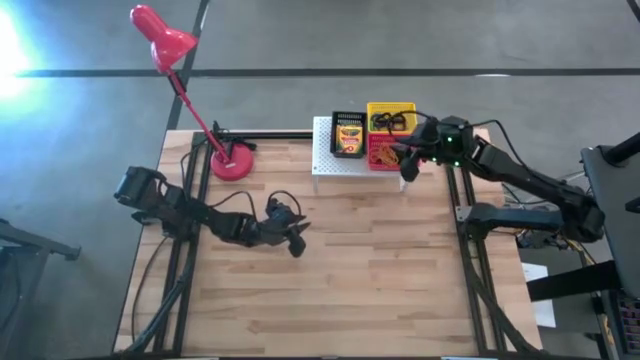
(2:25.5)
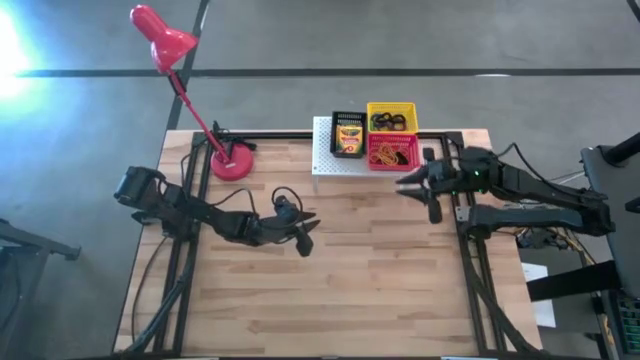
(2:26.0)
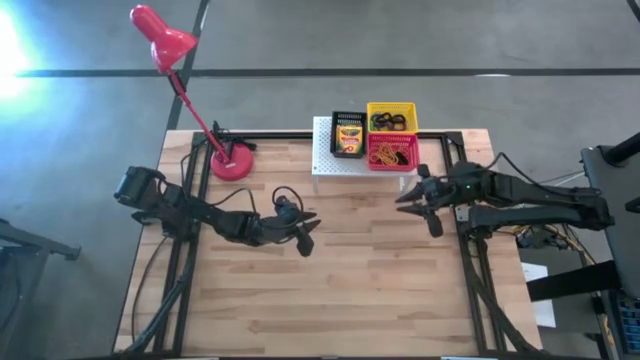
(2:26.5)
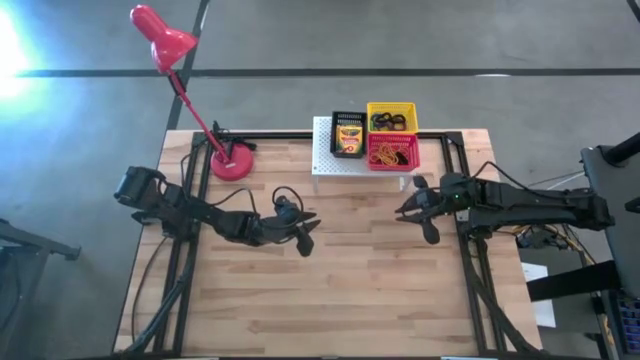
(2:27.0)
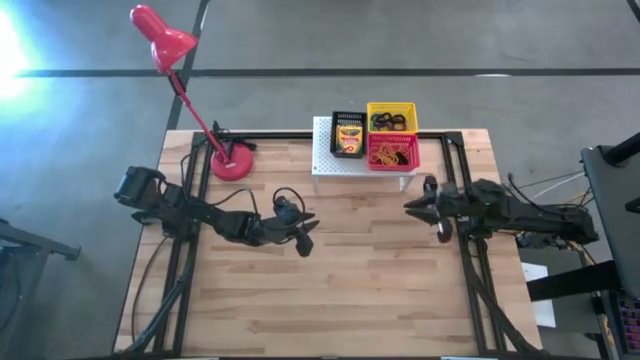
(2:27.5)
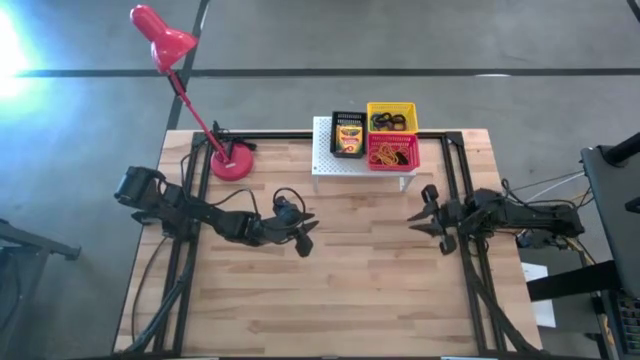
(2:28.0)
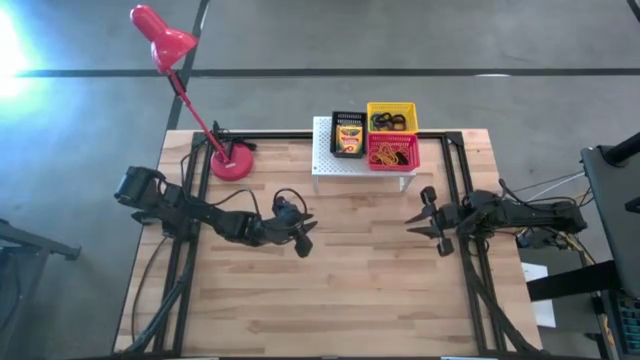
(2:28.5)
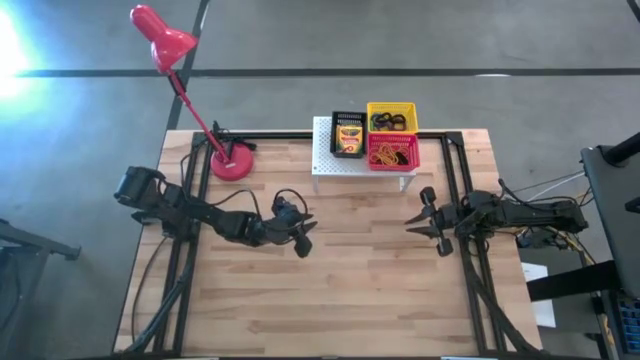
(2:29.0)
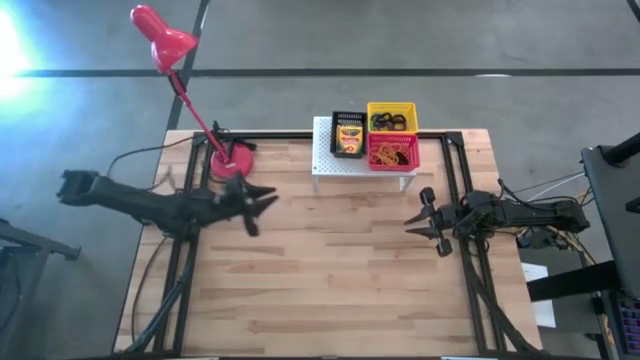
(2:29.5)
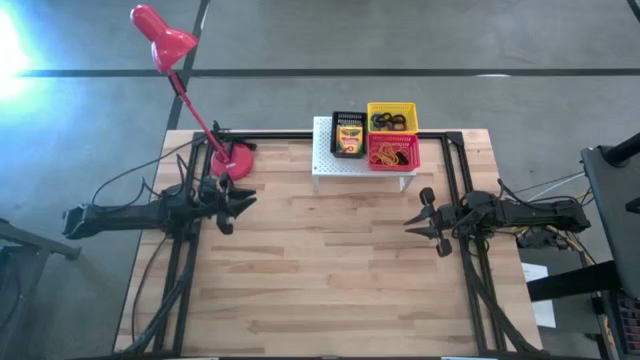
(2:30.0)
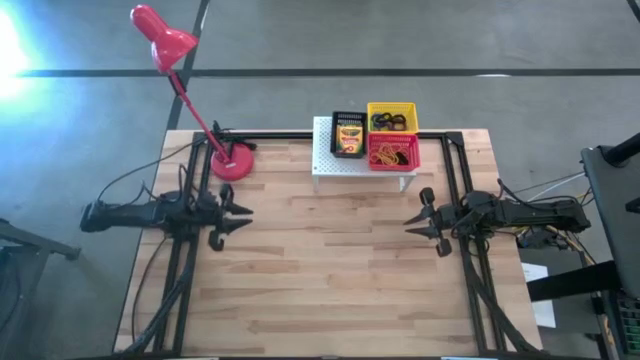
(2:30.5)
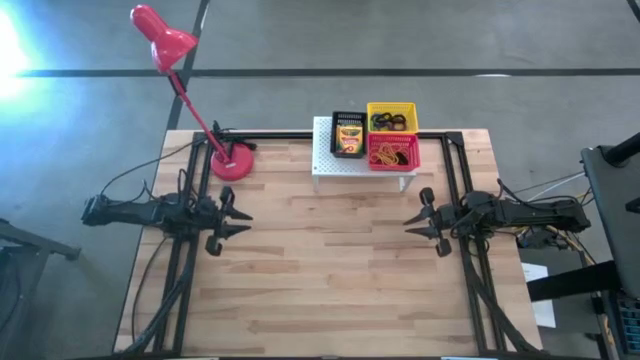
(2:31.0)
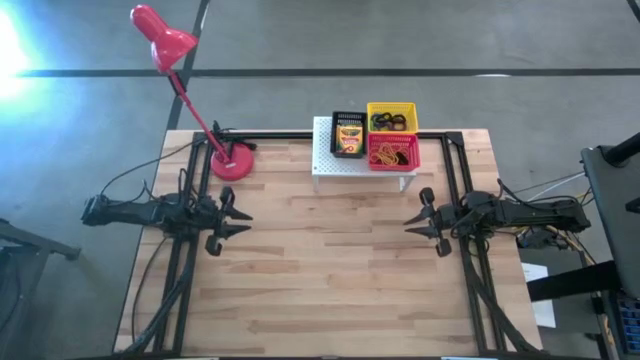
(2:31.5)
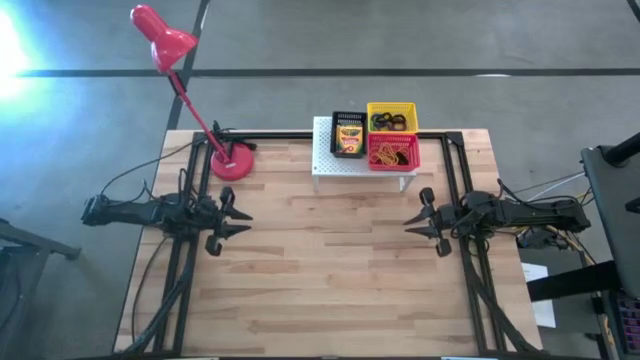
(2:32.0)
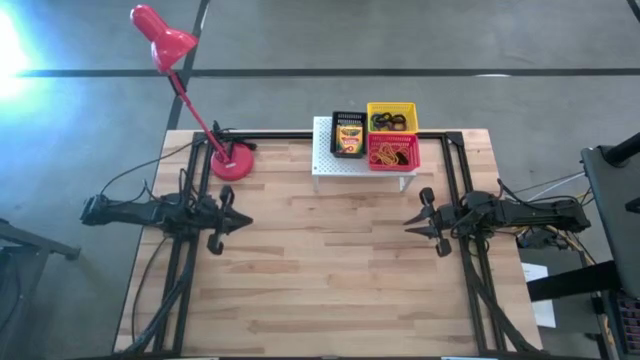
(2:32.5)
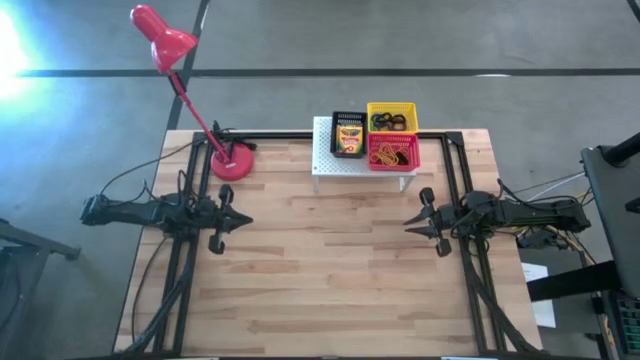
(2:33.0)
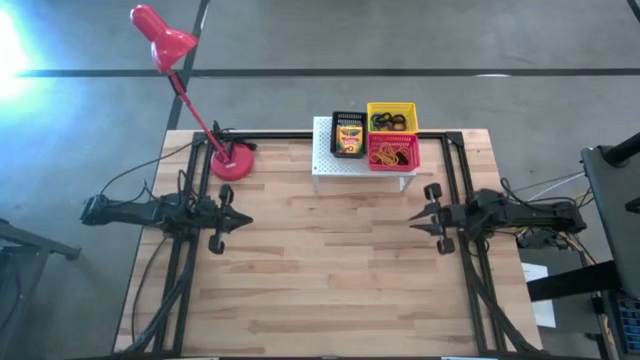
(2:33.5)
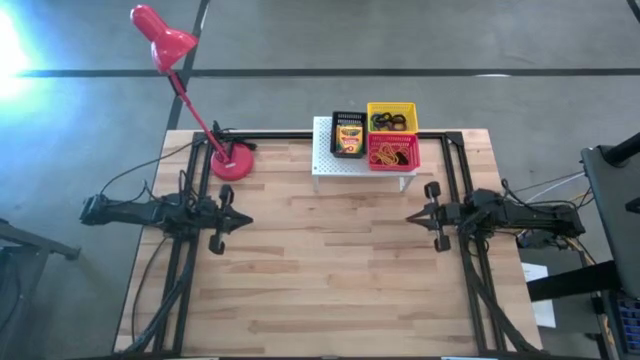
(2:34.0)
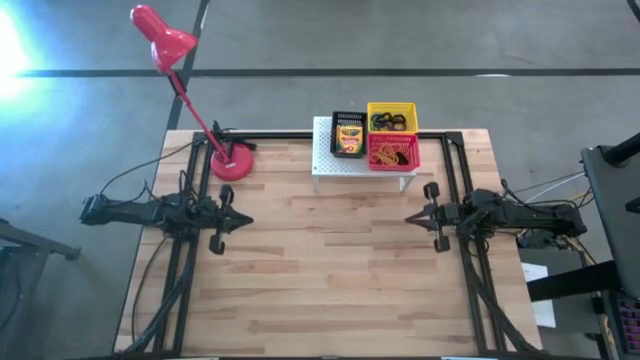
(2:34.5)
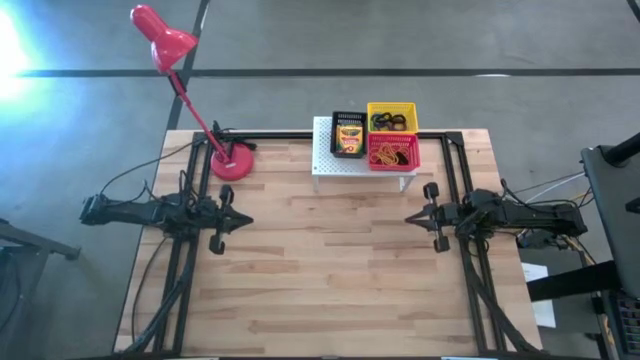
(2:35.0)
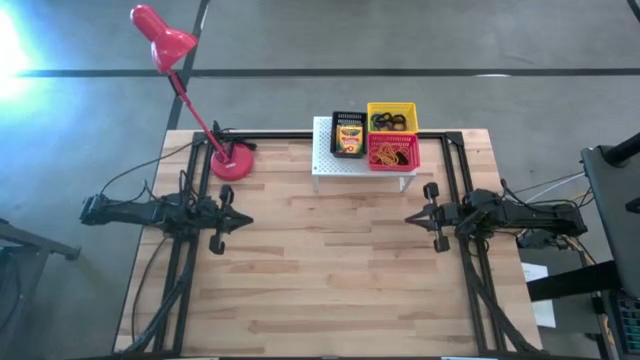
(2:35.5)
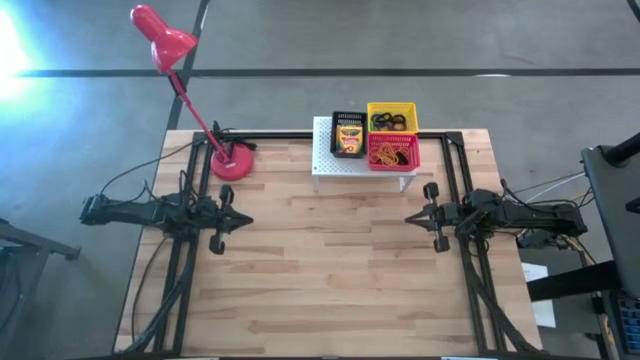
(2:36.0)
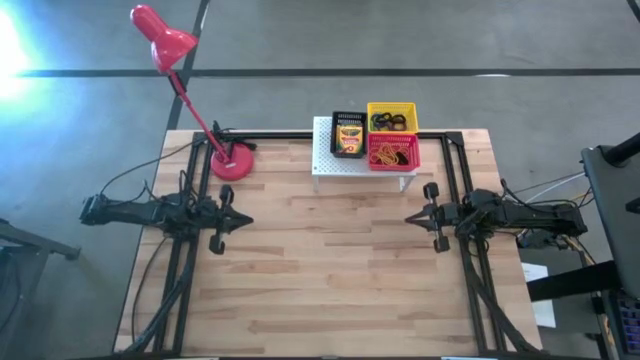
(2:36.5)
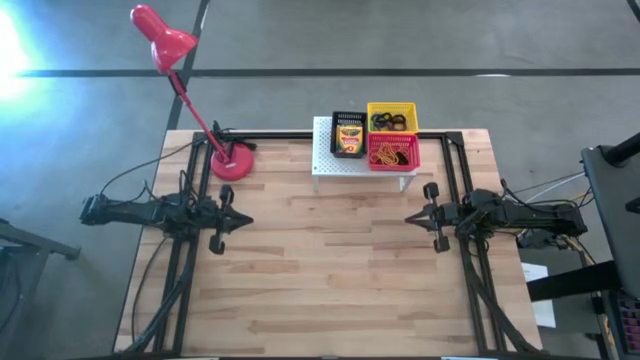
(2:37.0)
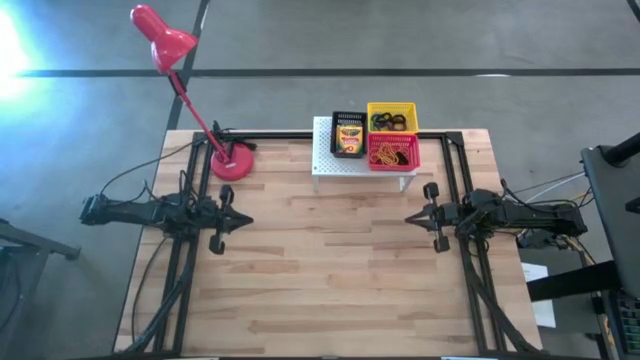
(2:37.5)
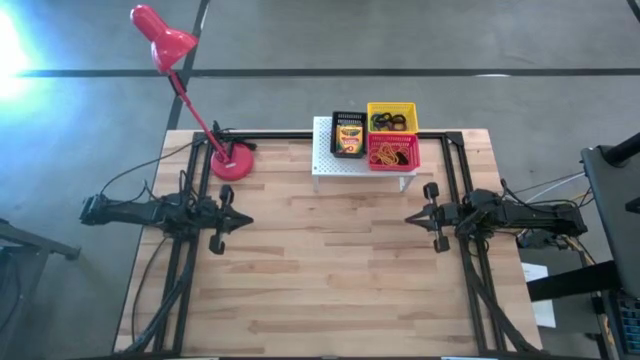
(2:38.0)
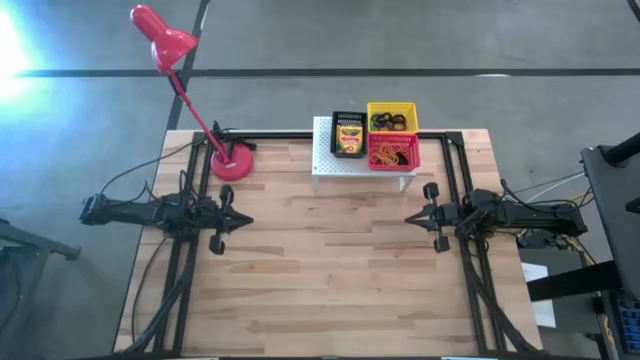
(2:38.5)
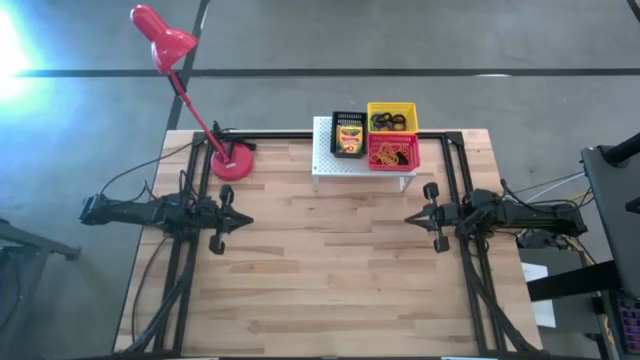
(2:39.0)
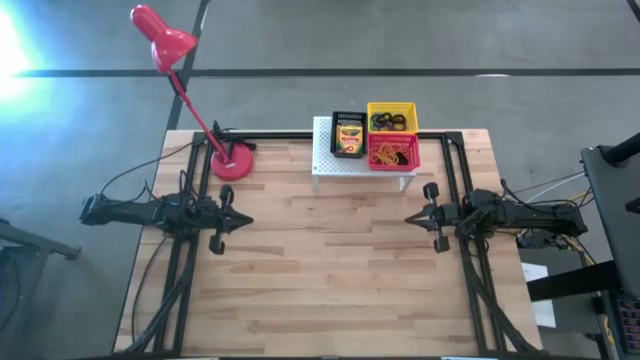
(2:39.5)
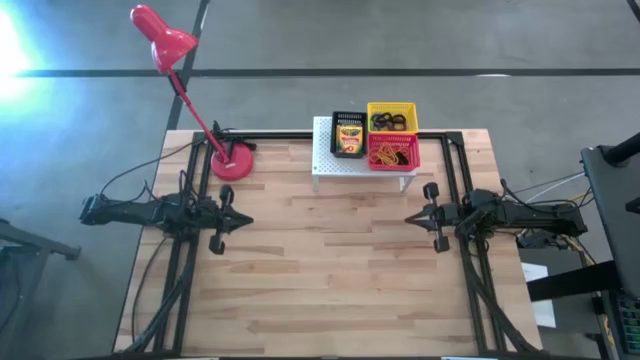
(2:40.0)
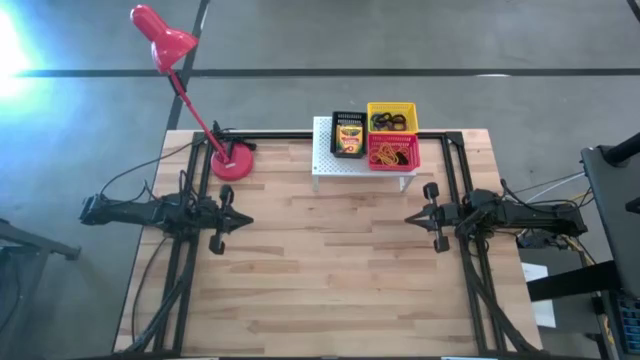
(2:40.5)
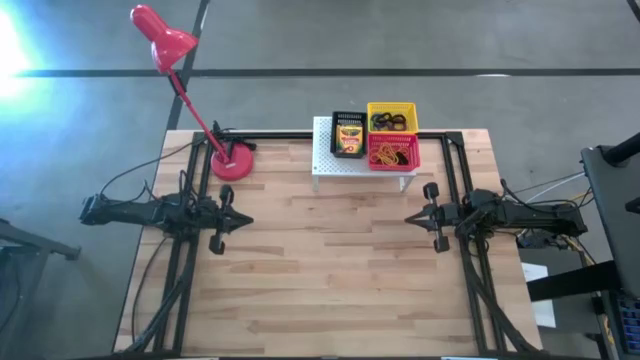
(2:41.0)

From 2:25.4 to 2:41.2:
Task: Pick & Place Office Desk Supplies
Return to Home Position

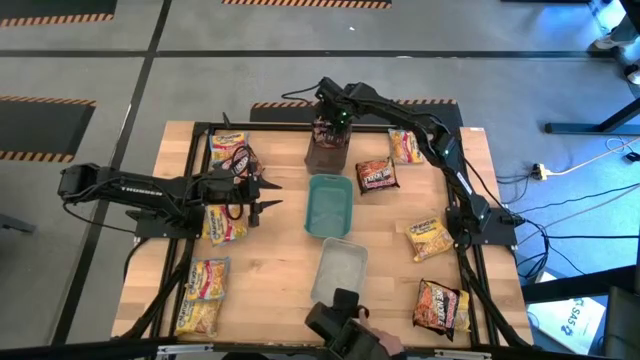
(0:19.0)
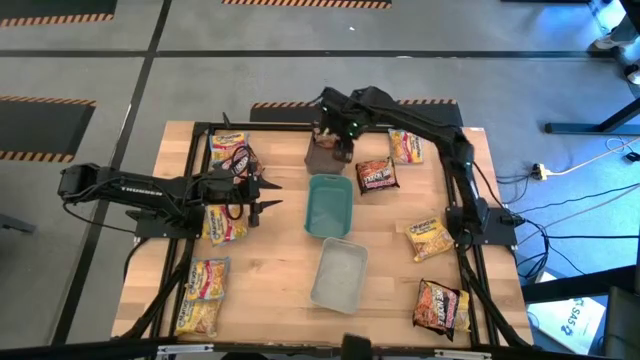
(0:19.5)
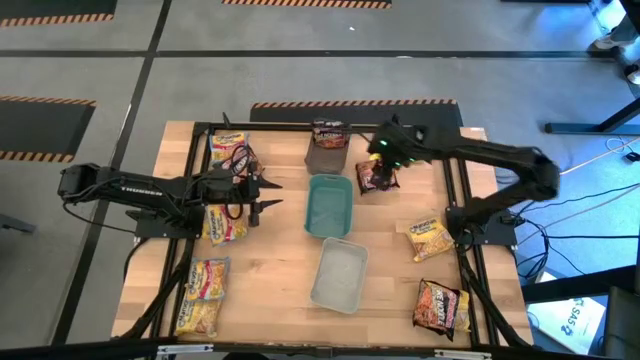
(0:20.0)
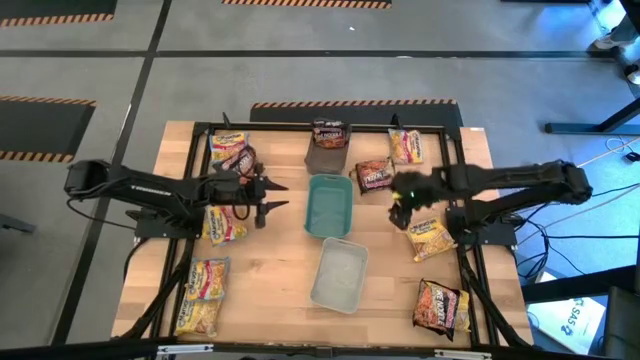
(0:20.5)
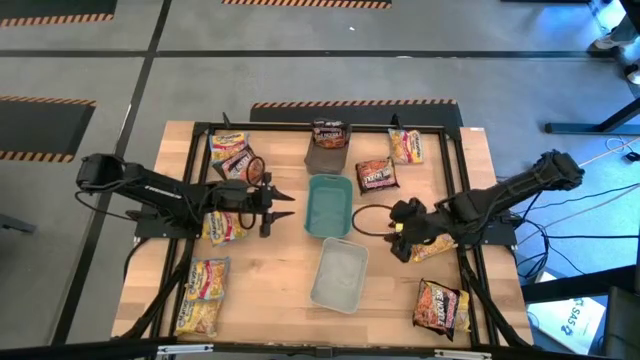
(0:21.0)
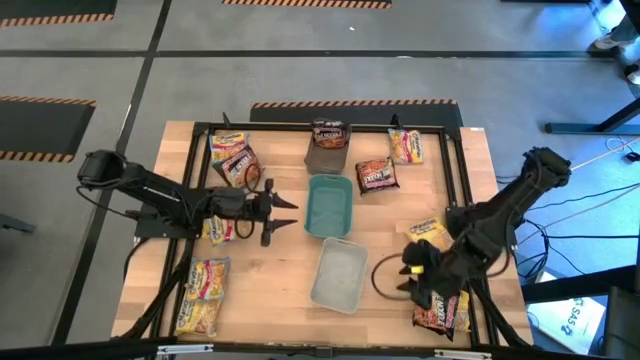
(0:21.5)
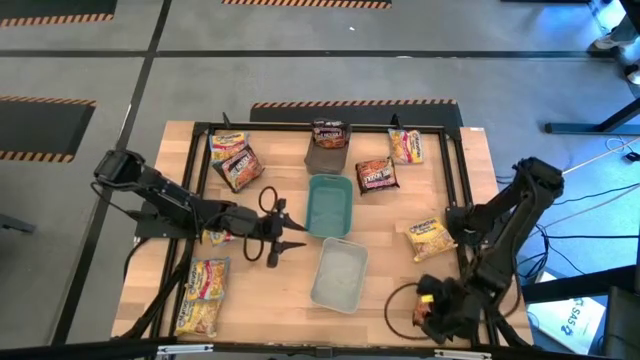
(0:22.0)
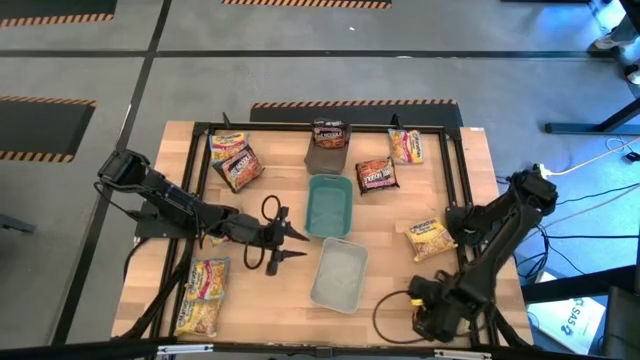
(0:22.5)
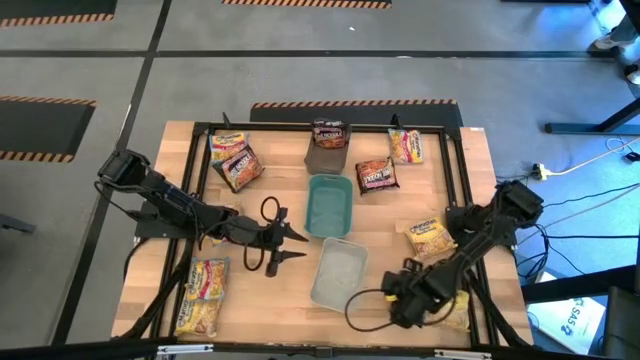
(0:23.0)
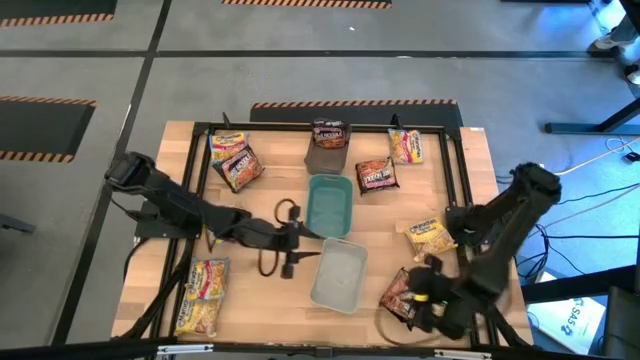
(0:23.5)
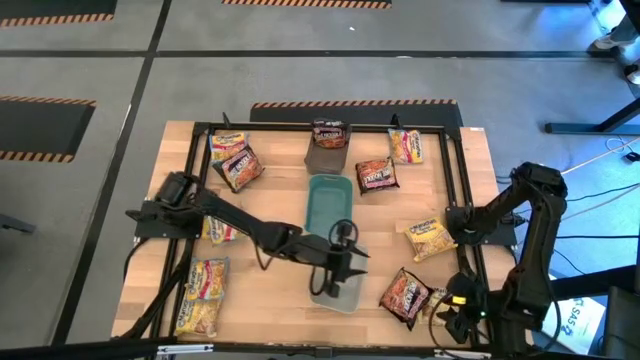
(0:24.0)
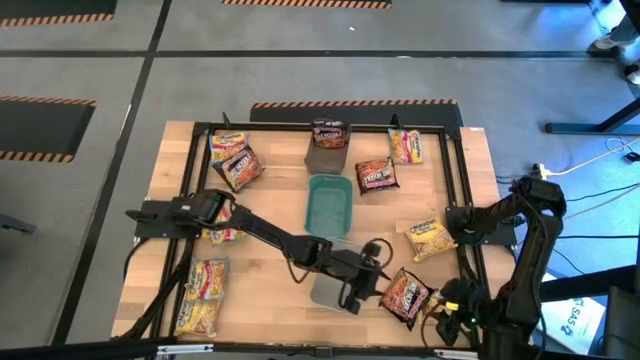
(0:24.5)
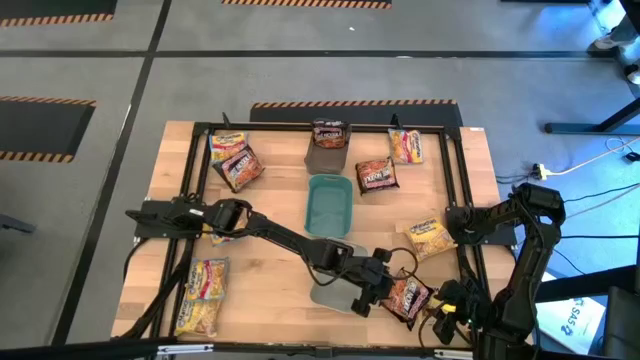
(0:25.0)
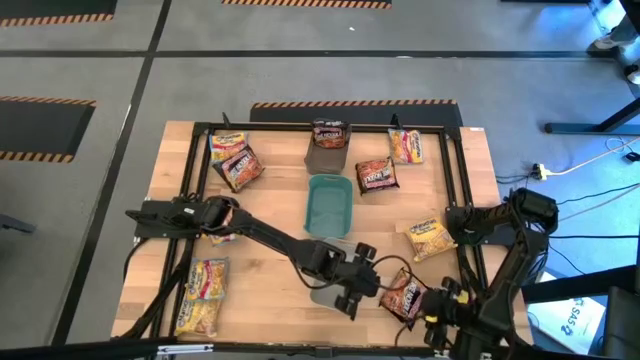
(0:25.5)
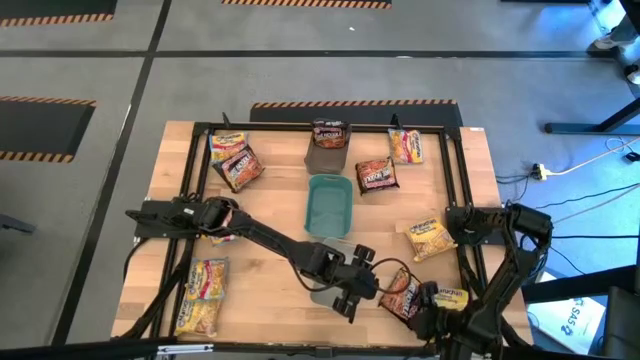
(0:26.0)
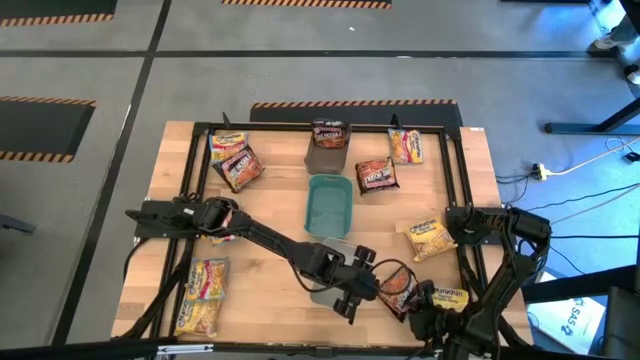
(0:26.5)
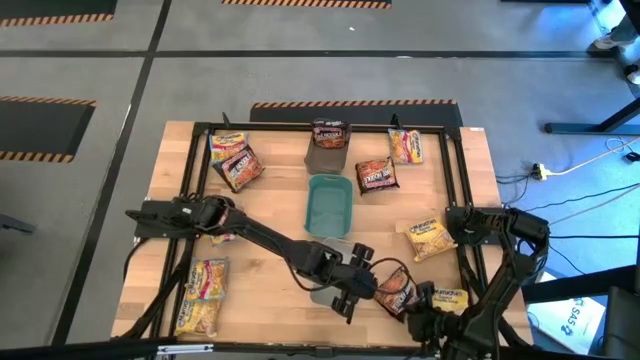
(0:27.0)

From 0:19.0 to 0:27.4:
Task: Sort Maruchan noodles
Put the black noodle pack into the black bin
